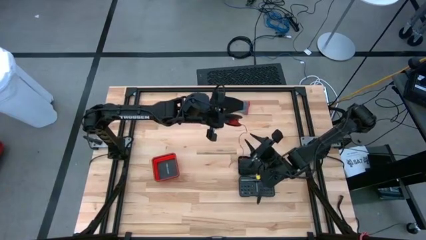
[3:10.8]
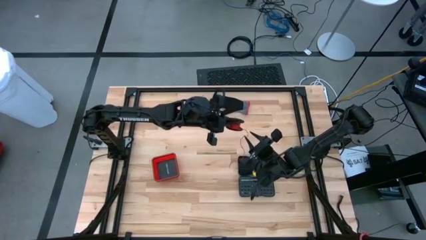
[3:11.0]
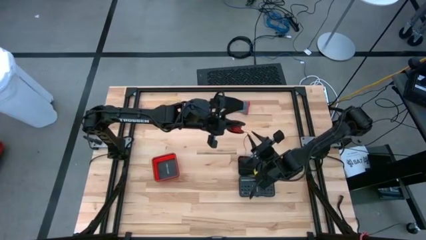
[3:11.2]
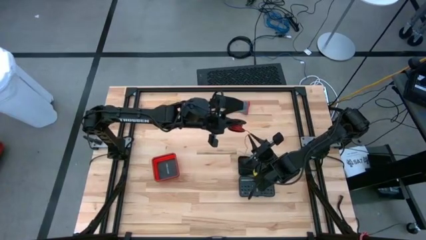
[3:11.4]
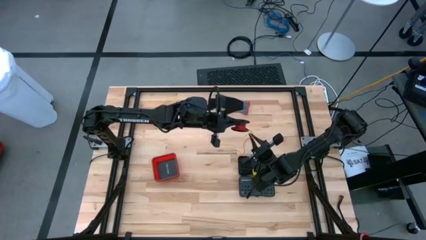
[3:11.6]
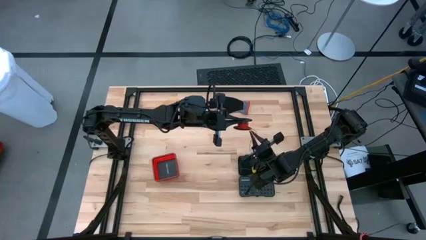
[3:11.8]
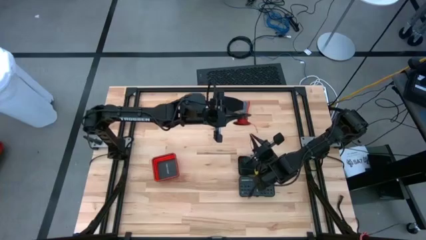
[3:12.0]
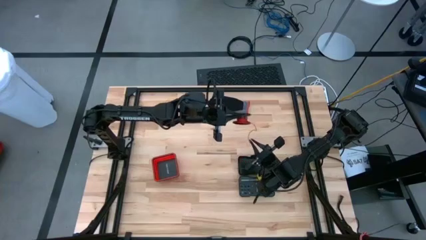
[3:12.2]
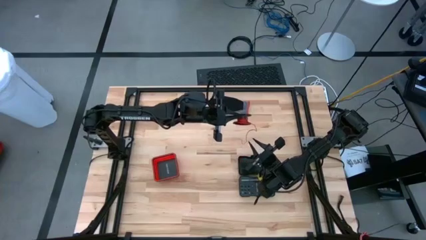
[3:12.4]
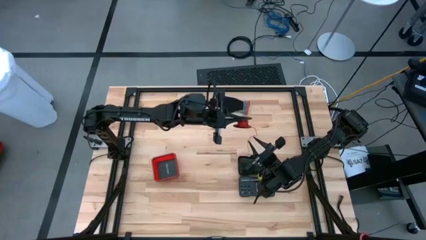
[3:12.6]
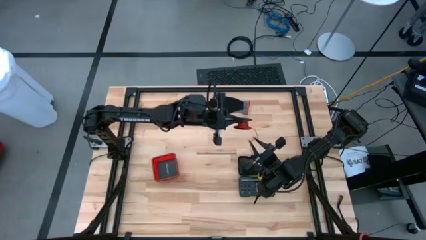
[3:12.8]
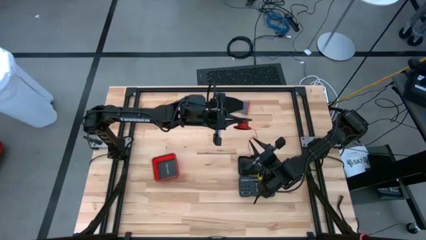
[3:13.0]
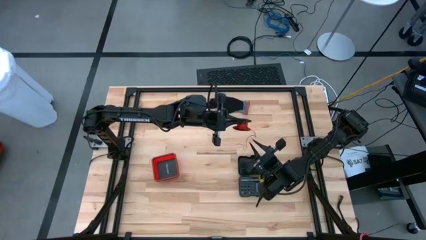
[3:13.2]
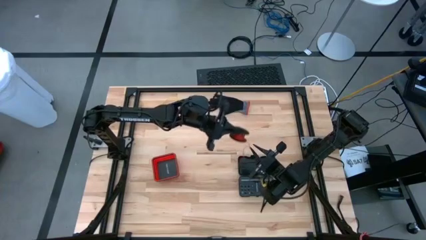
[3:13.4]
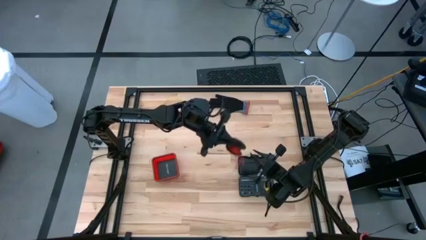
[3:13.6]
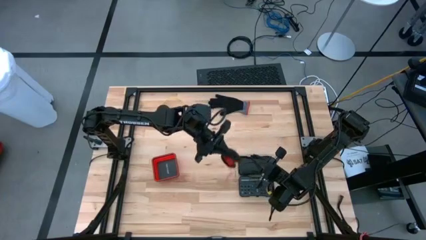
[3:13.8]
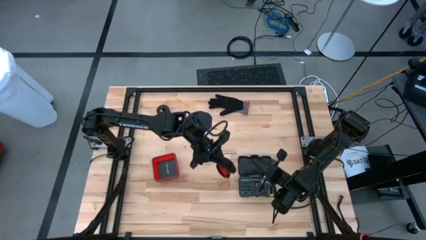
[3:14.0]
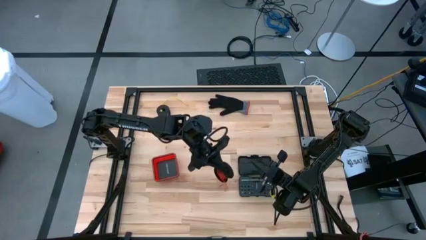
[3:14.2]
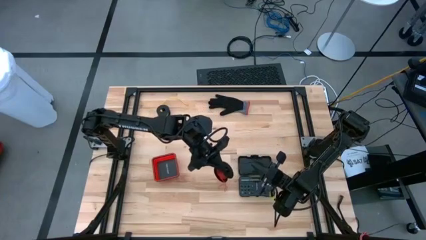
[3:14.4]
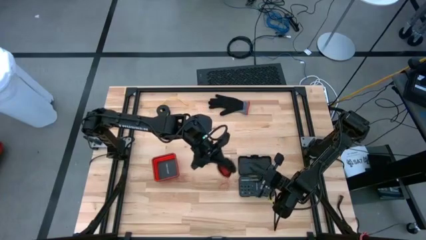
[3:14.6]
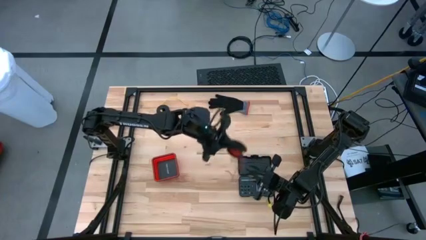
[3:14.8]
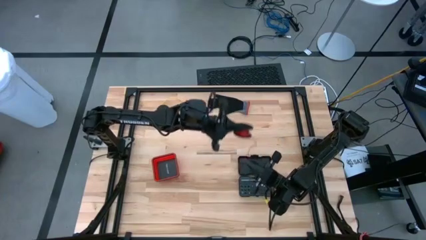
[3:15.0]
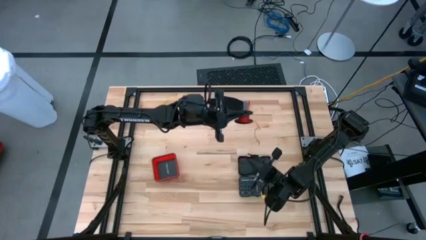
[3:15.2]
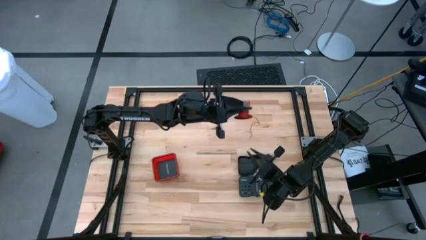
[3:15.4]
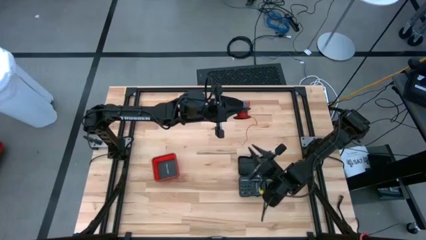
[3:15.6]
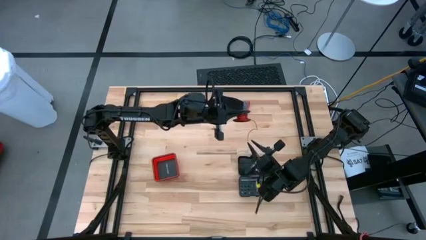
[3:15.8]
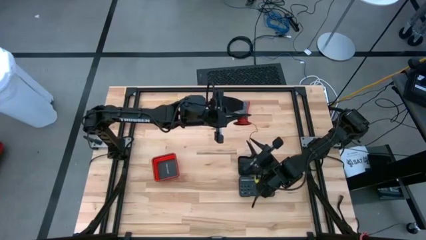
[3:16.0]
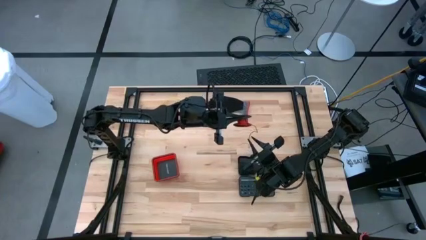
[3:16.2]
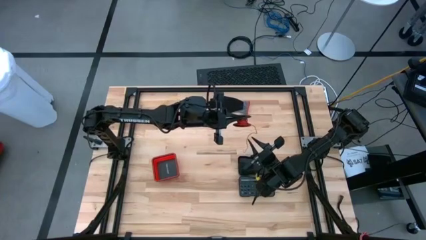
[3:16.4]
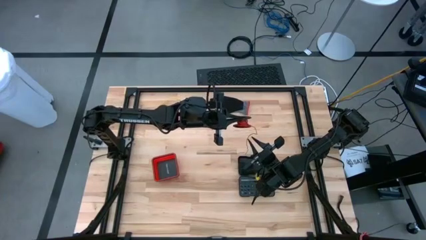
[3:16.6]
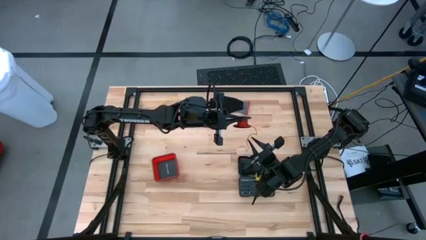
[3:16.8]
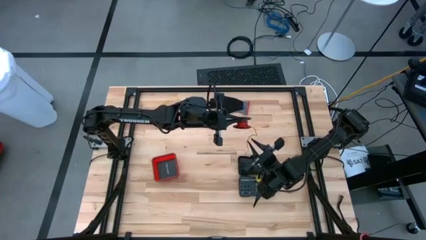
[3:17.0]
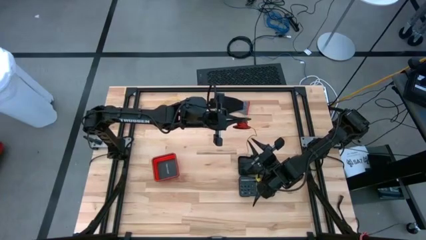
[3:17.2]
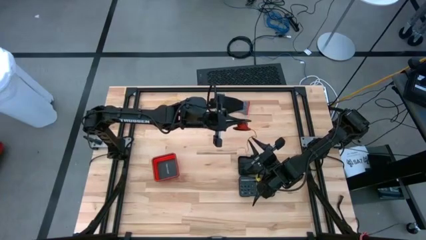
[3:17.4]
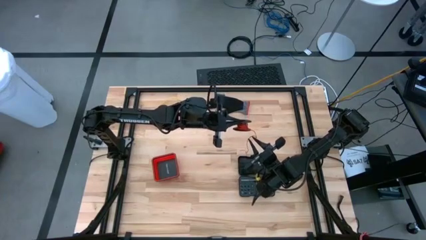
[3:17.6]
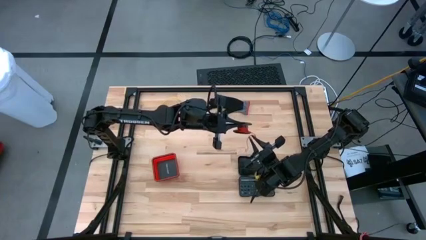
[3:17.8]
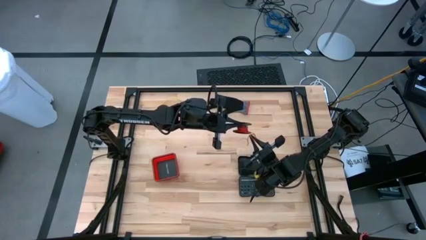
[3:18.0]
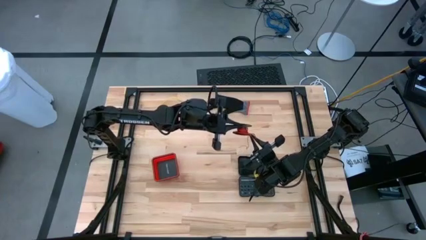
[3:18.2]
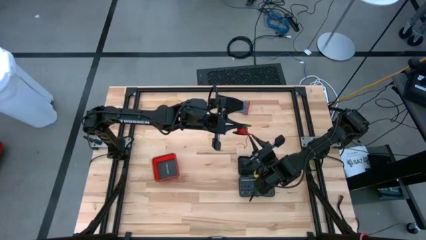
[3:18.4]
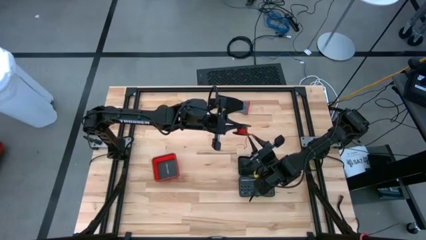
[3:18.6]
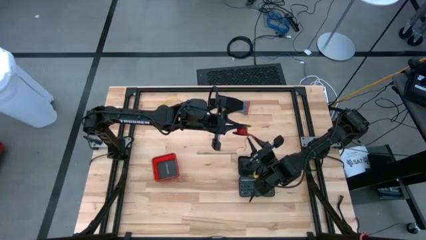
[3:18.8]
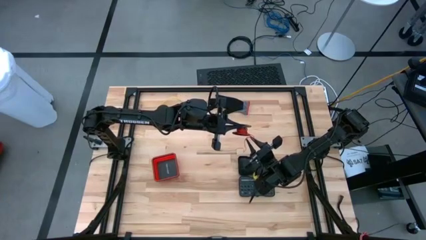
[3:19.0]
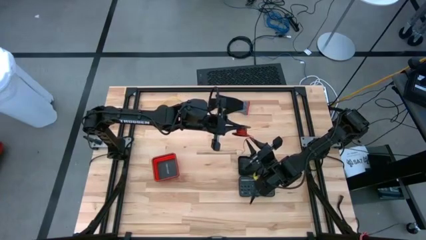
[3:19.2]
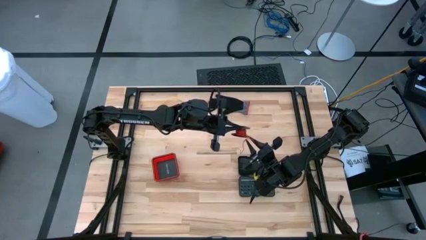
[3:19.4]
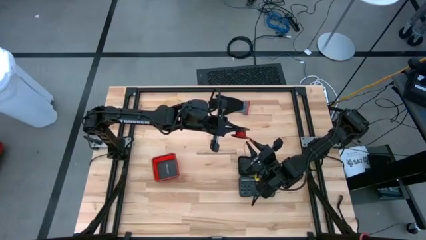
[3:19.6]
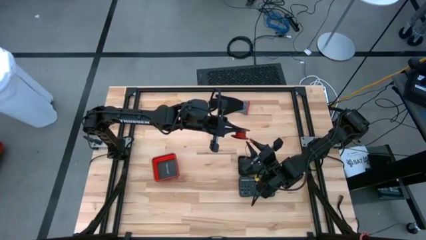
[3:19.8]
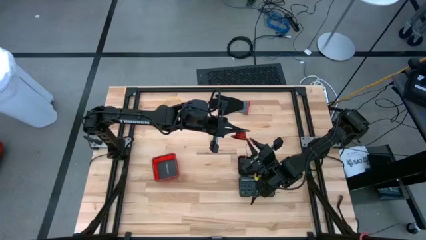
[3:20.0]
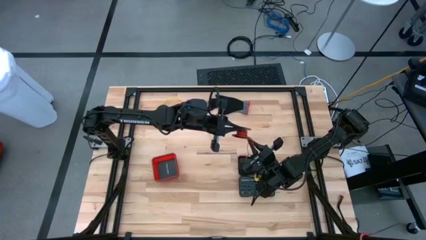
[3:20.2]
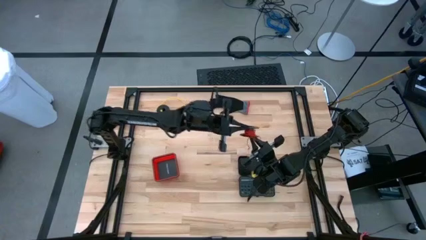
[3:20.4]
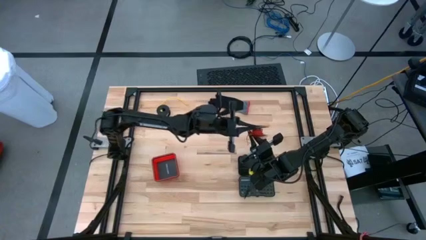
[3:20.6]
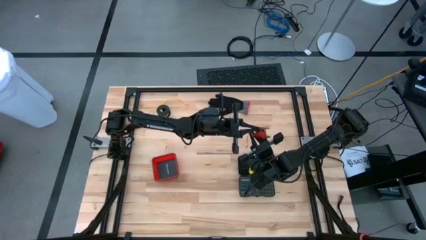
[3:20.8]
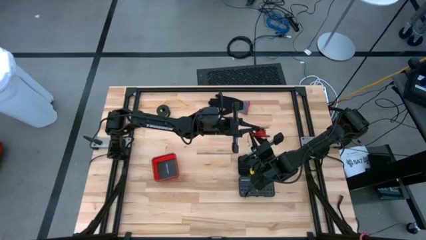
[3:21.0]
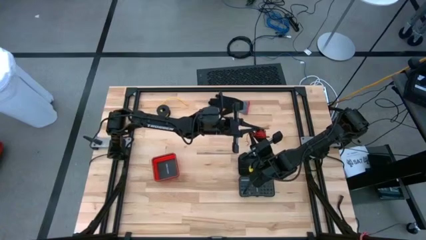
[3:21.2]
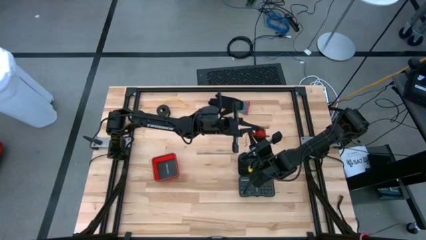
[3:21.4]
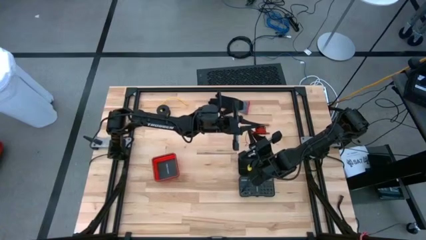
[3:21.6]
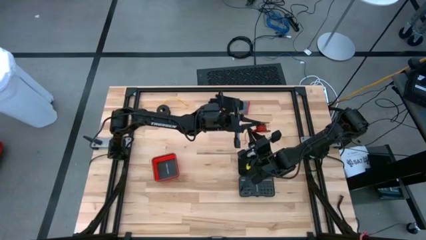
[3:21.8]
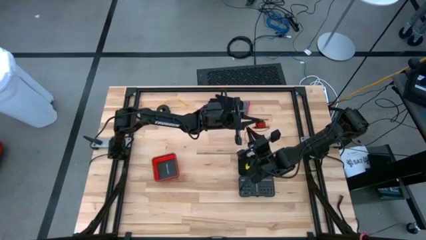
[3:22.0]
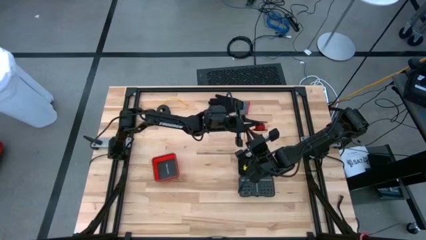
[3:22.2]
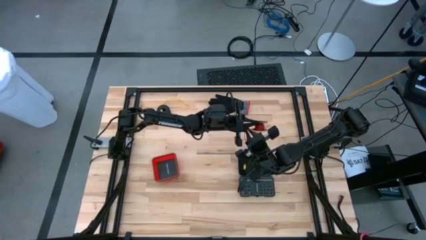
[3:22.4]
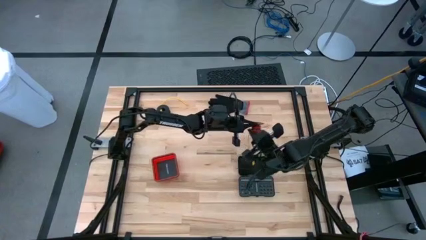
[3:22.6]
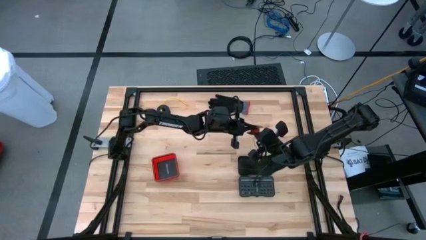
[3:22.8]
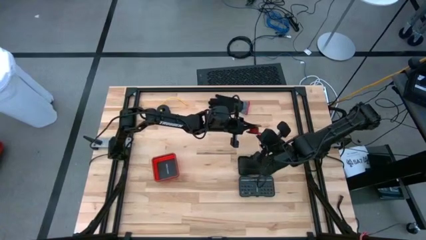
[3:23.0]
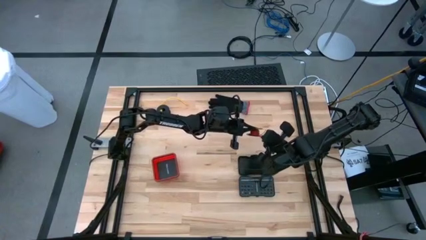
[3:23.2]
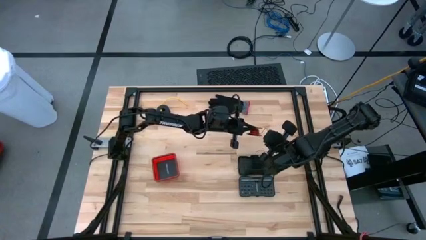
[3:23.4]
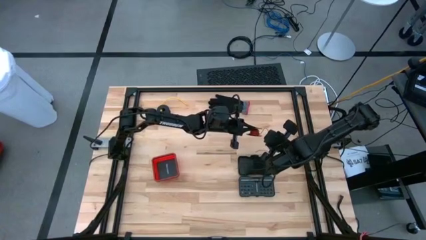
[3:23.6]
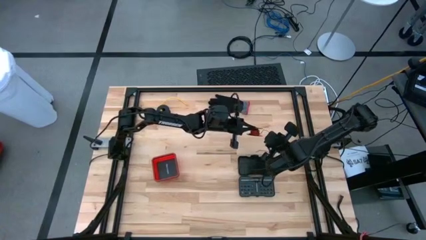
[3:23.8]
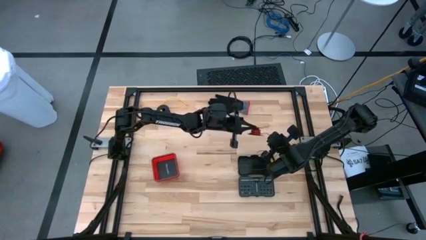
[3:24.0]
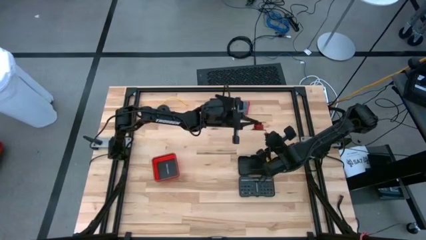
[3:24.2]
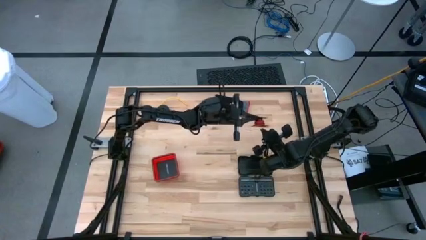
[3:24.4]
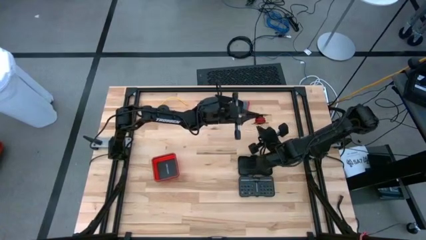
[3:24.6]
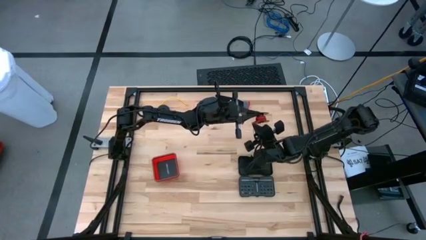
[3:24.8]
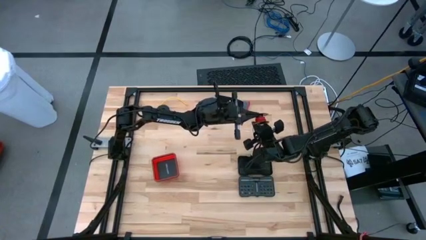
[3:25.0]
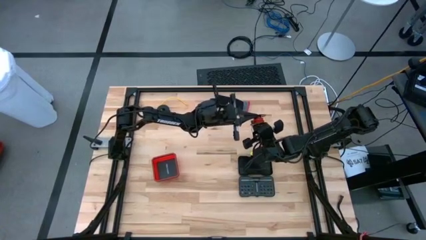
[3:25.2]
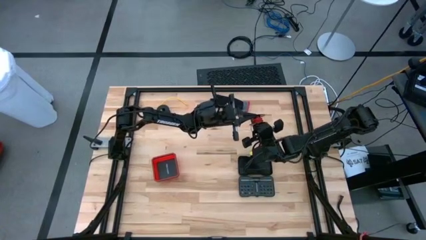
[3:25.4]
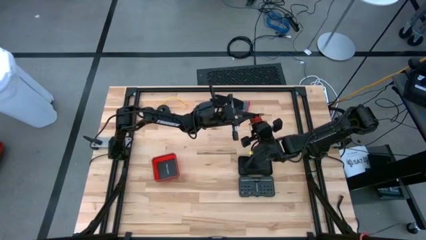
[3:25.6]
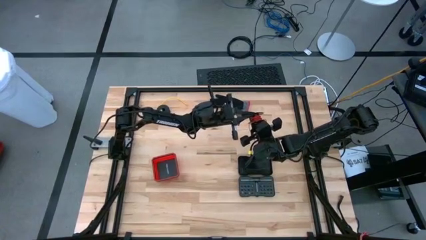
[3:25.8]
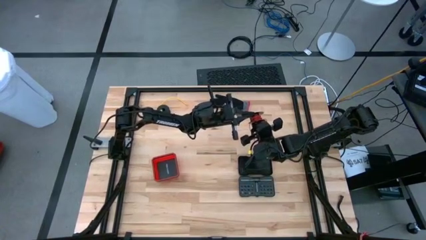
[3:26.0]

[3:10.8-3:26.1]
Task: Coil cords
Coil the red wire onto the spool
